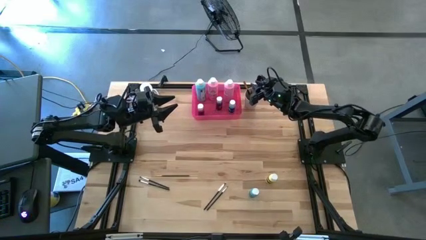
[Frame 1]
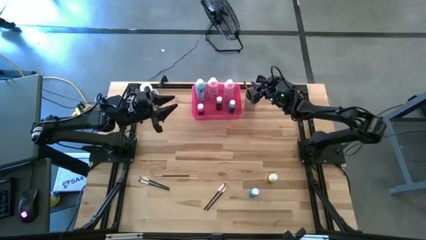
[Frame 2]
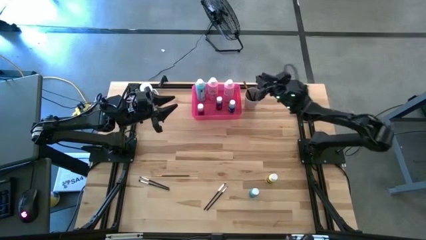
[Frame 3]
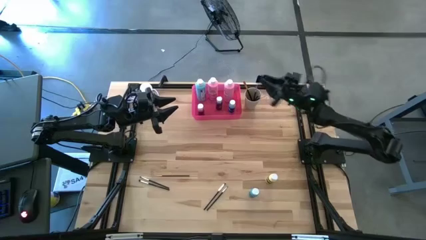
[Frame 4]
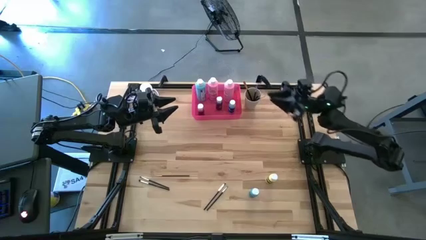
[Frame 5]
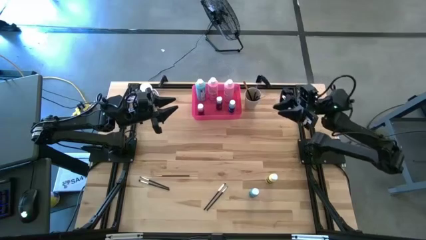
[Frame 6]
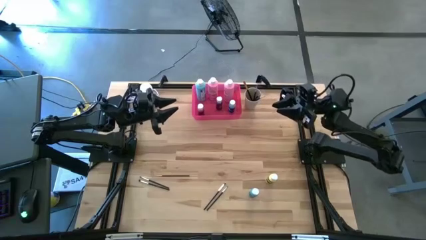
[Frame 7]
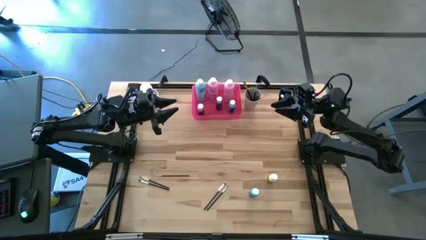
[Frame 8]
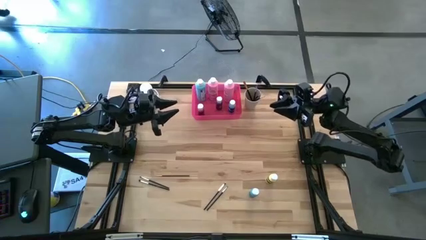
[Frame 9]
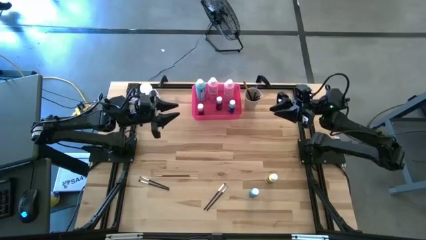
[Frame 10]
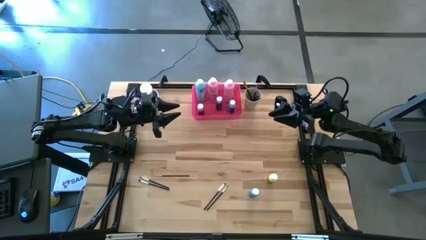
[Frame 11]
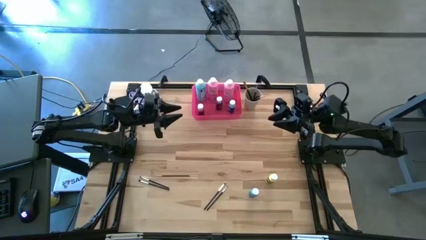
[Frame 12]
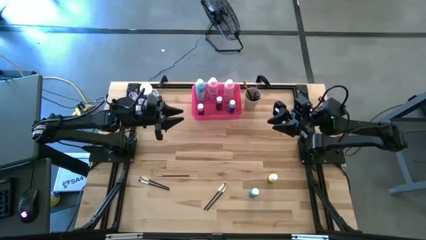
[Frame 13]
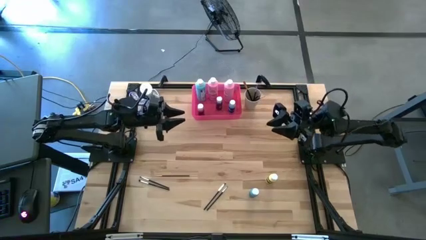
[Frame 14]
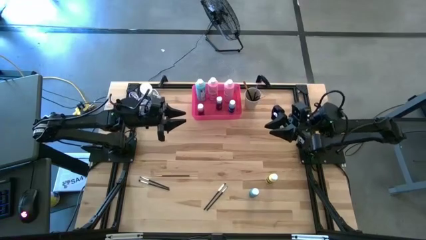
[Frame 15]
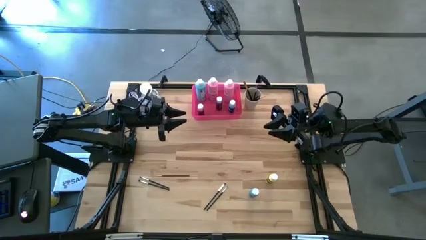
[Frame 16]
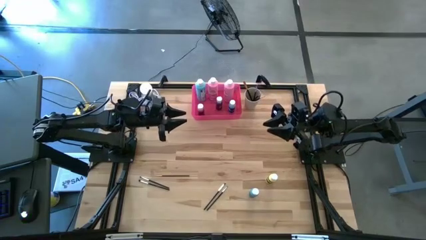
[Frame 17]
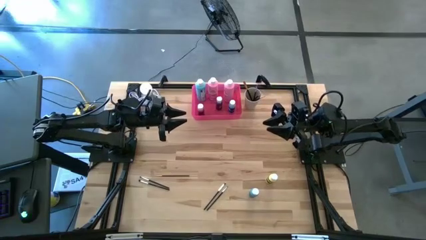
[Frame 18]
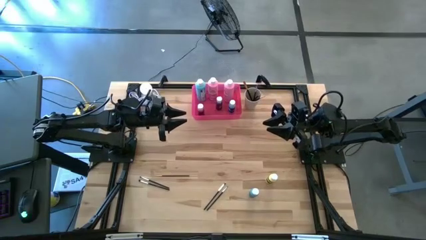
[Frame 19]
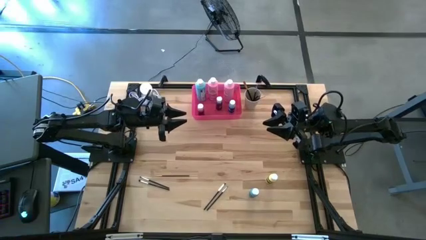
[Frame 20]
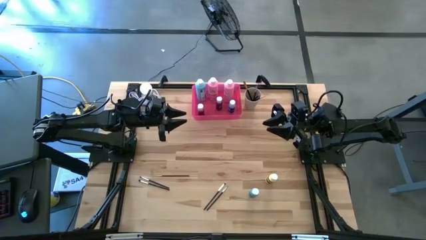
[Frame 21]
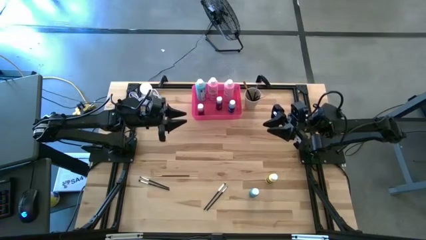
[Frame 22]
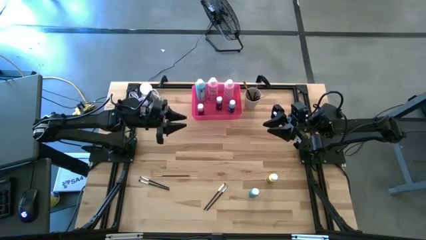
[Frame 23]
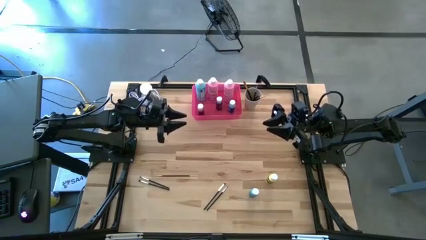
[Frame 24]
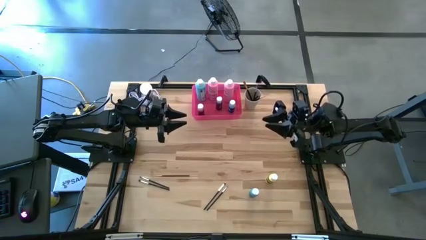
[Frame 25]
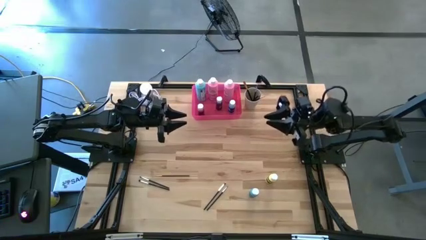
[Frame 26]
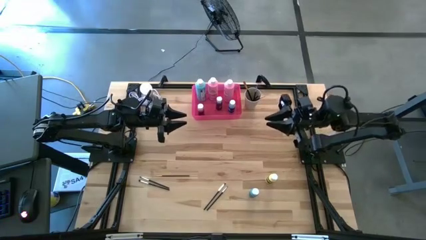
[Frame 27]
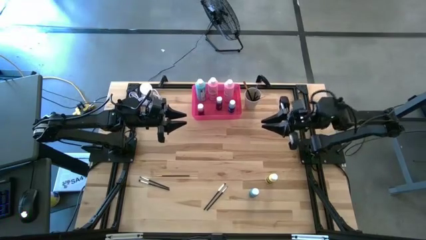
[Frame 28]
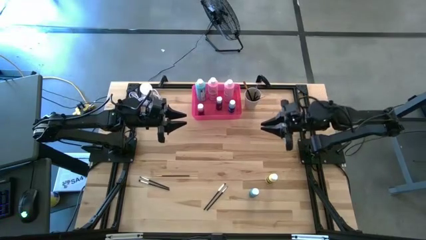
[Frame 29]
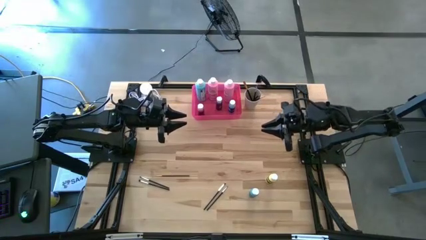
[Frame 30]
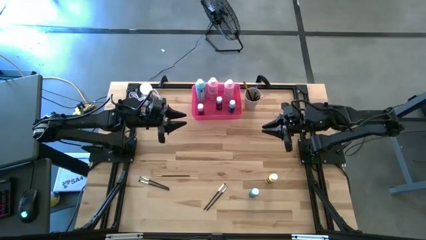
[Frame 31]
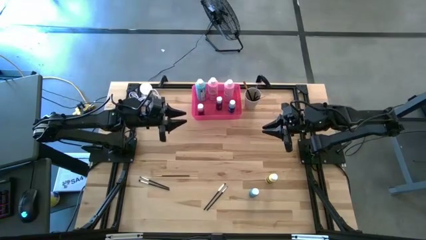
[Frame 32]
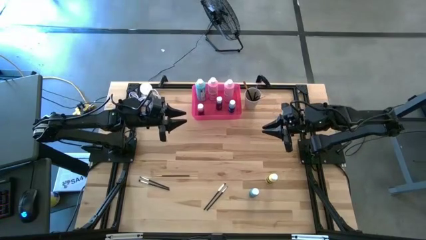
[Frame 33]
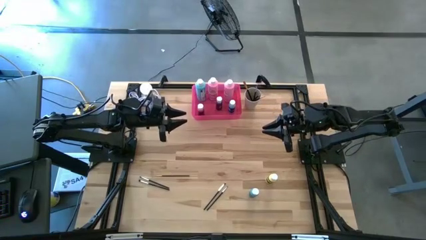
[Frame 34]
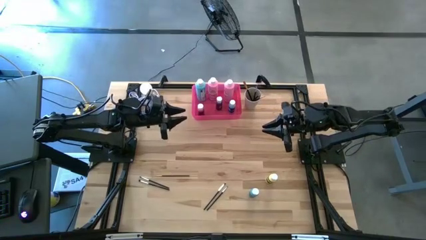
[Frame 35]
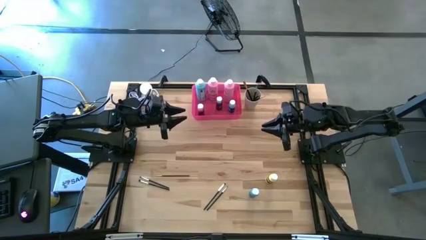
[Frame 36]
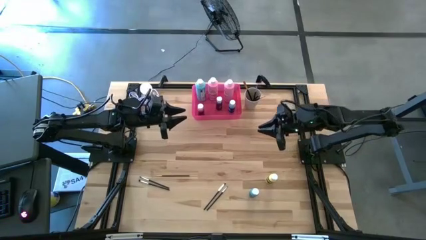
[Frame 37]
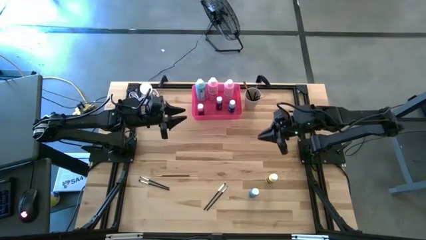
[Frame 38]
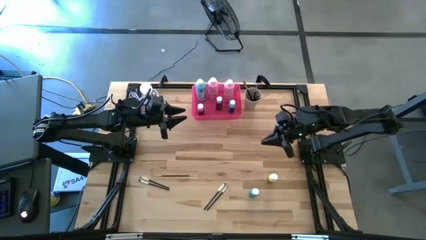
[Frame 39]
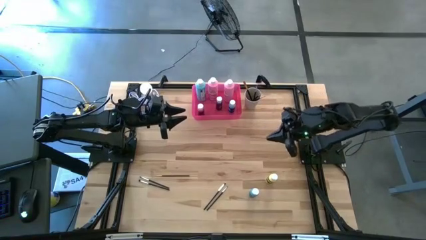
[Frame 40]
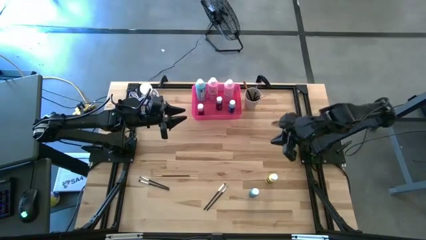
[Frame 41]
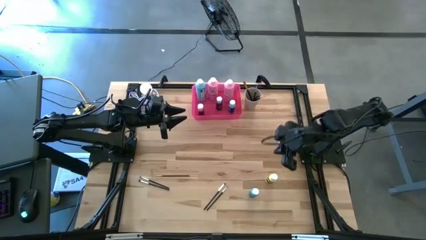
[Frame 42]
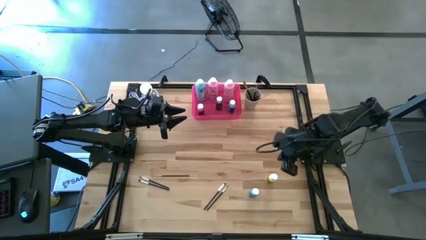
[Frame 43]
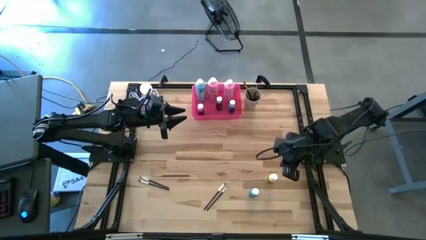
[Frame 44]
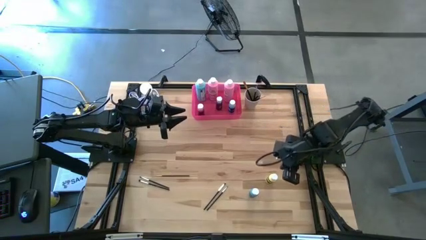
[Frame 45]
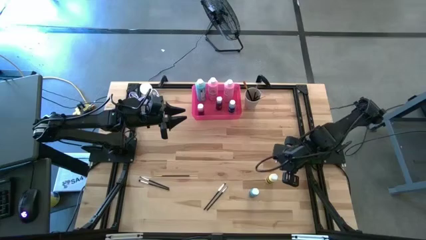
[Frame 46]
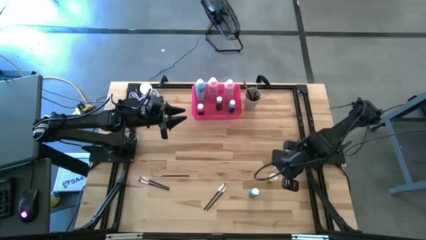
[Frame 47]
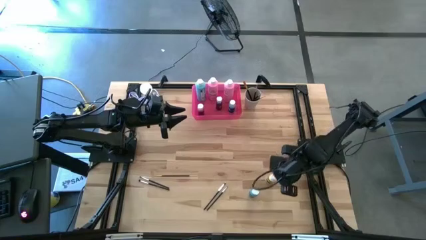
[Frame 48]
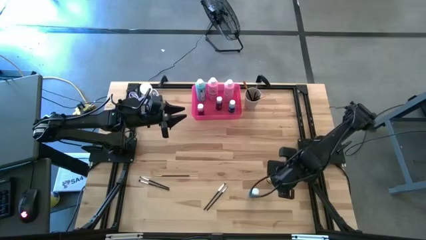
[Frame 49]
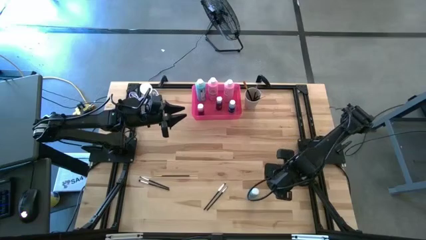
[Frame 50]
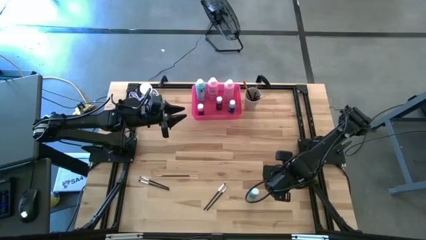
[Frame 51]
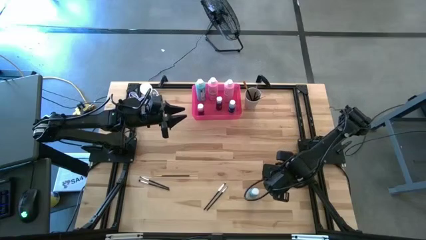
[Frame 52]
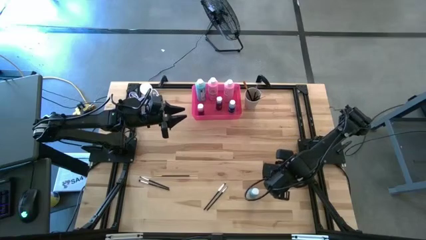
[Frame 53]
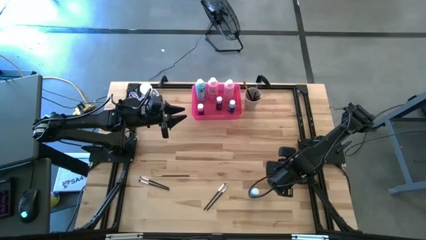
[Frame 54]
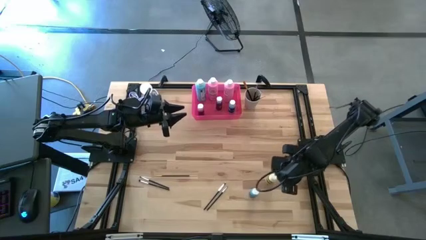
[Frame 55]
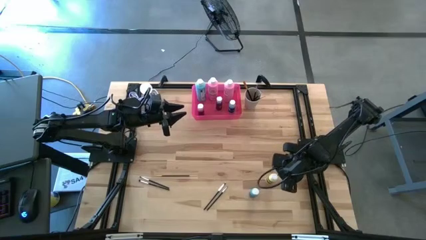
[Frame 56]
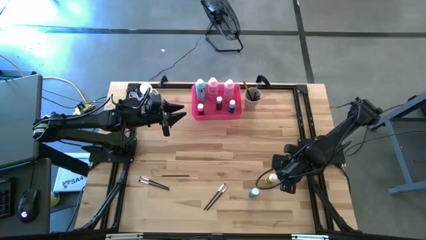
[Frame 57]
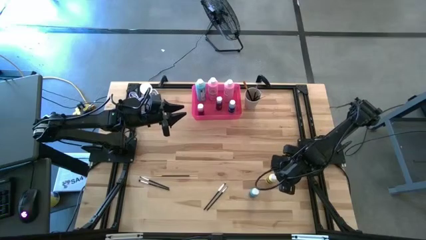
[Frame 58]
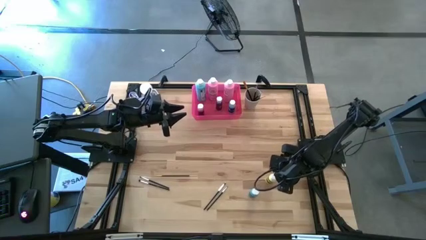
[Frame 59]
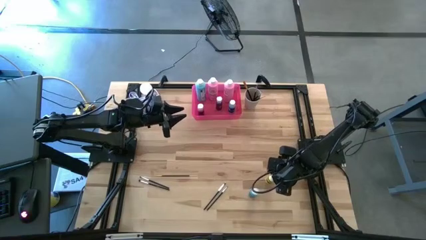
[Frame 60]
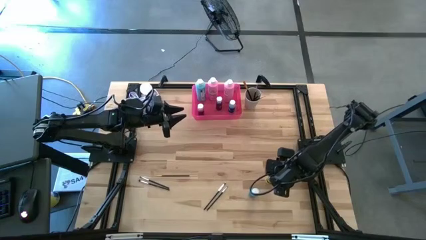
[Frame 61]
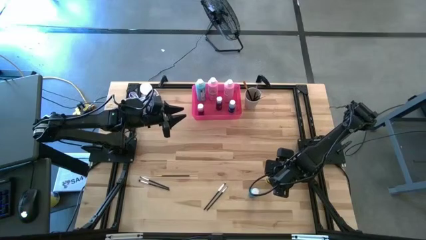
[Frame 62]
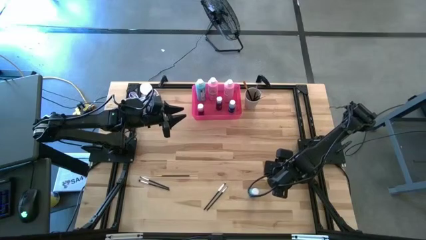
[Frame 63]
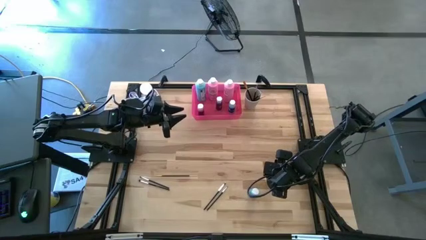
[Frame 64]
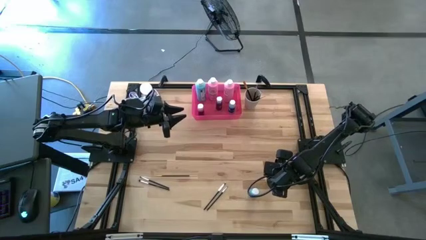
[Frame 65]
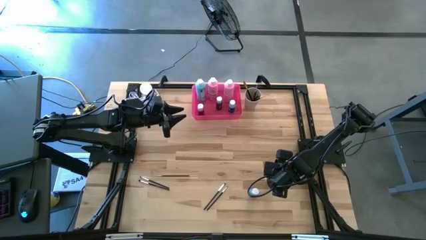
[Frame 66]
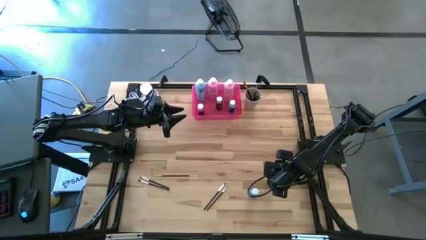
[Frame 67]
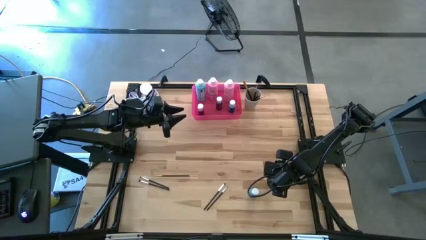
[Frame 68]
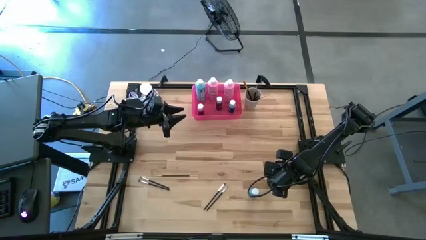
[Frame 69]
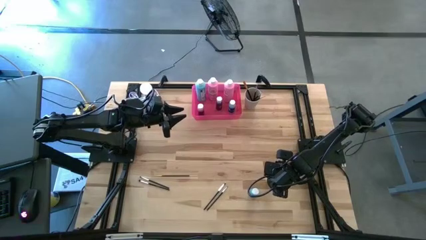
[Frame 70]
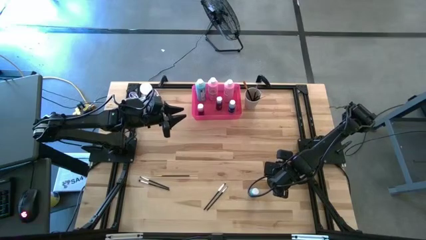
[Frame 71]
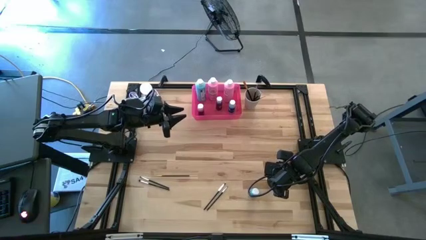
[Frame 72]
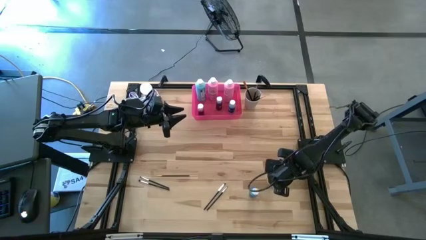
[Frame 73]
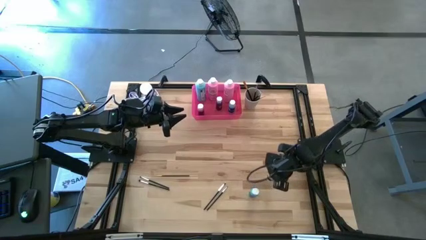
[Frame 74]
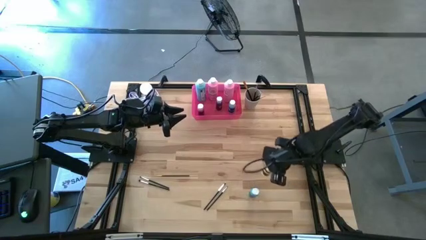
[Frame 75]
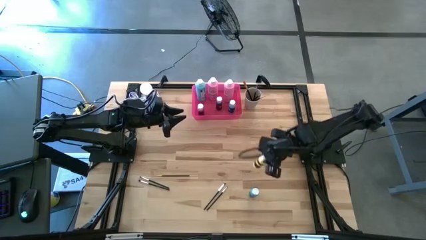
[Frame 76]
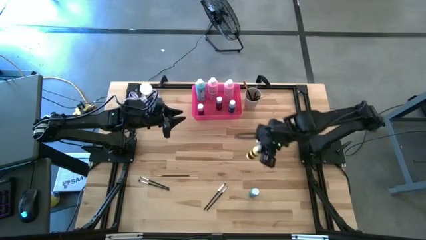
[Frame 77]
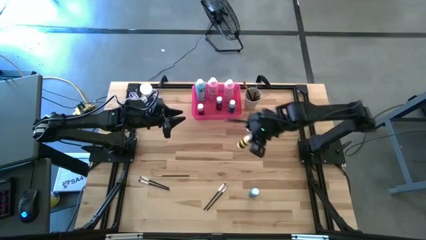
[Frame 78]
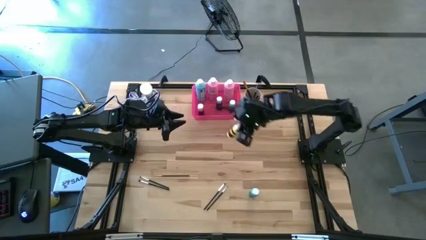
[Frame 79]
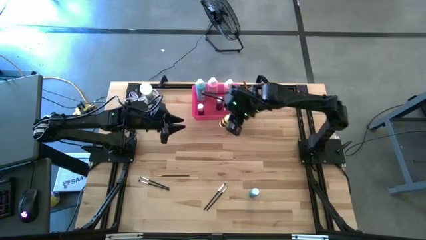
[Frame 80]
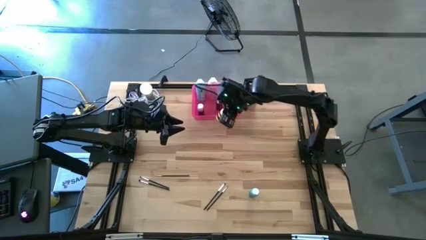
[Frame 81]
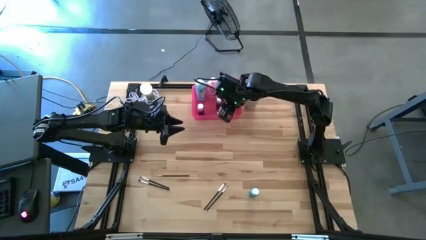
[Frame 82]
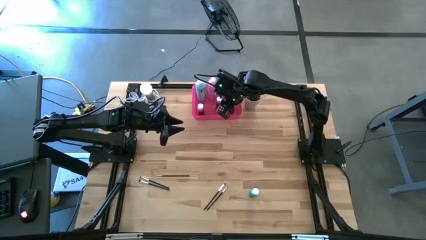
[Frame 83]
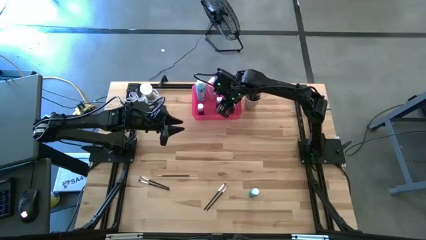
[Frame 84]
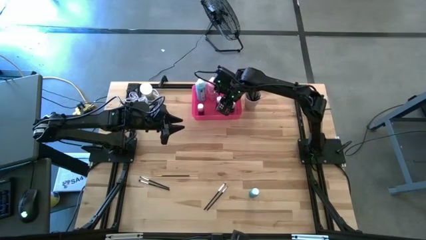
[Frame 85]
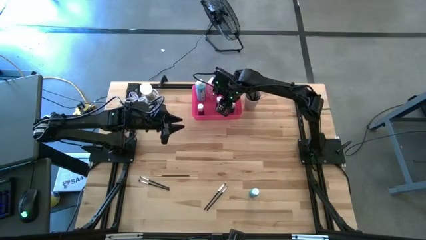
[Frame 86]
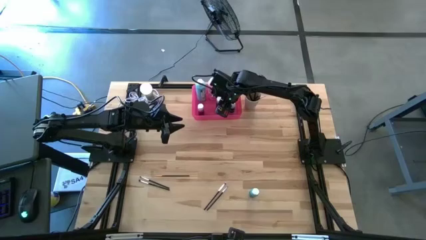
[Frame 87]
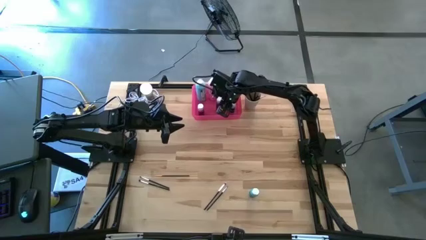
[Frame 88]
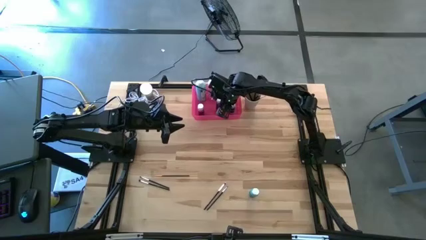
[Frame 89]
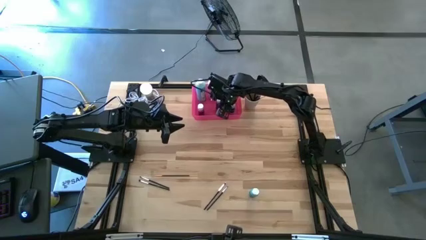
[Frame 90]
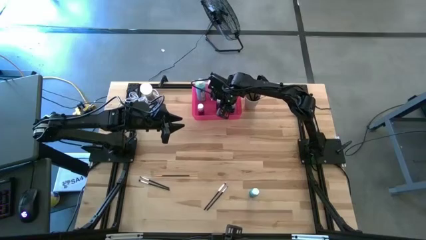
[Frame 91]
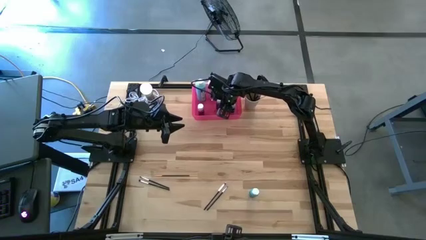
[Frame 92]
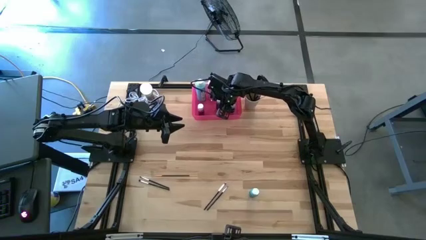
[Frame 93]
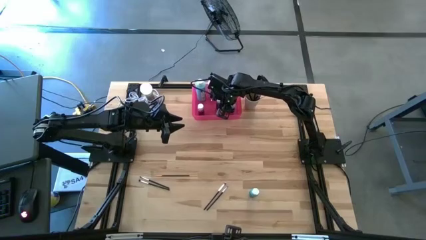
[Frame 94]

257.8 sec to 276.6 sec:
Task: Pick & Place Paint Supplies
Put the small yellow paint bottle into the pink bin
